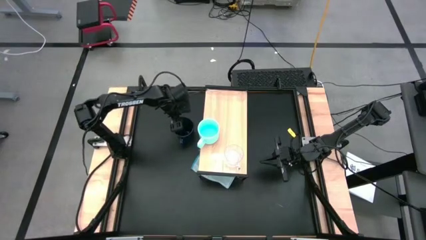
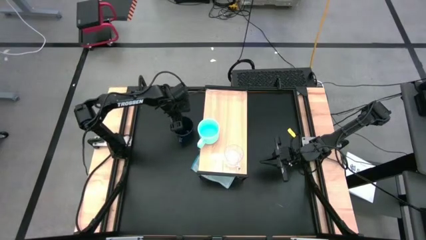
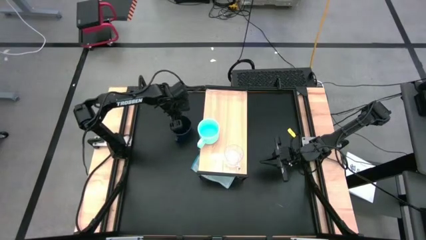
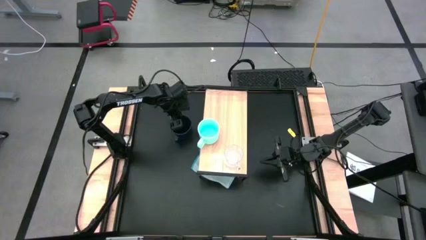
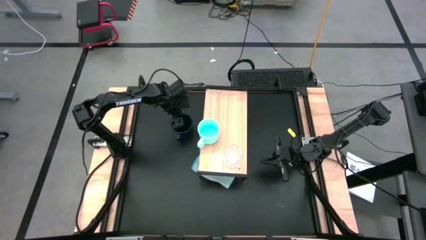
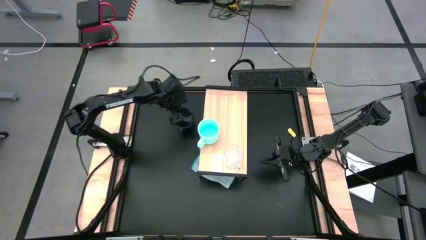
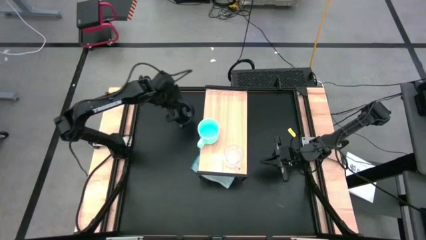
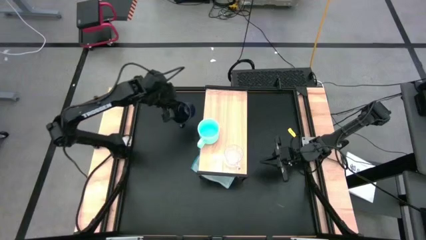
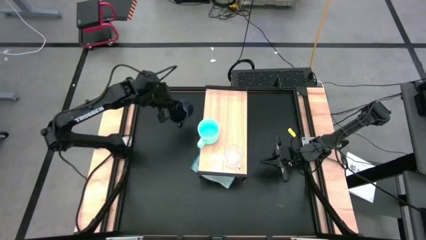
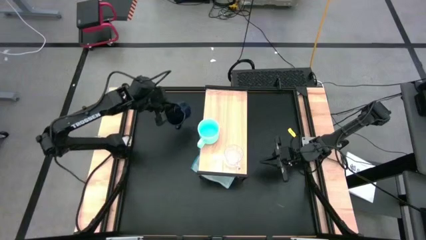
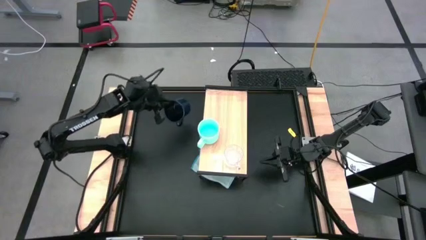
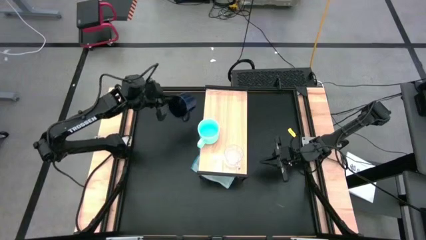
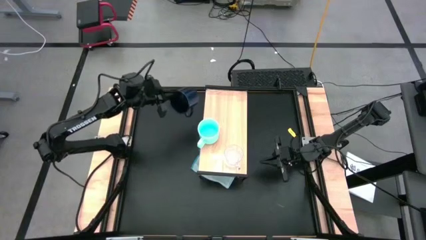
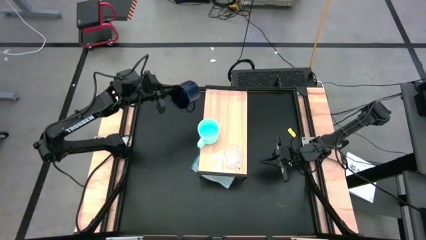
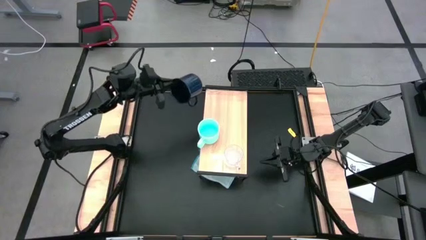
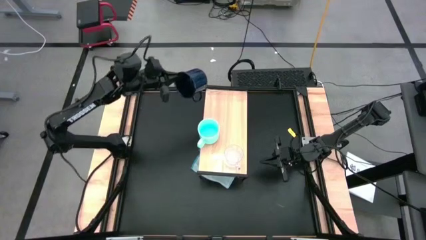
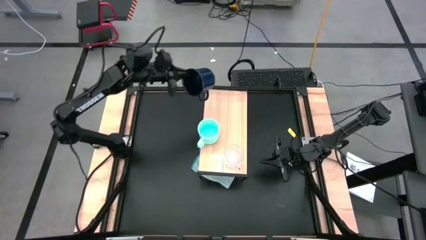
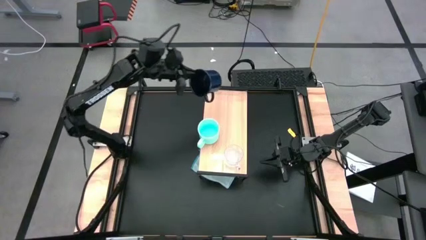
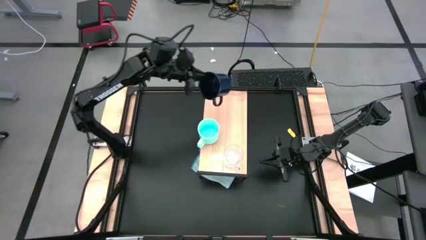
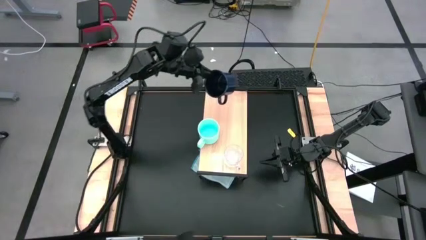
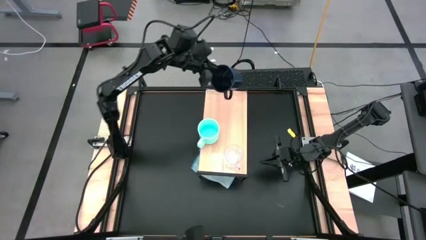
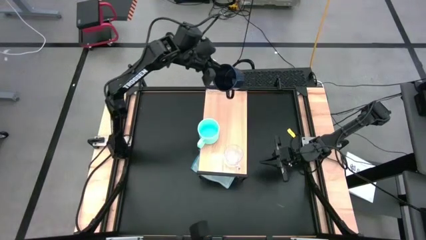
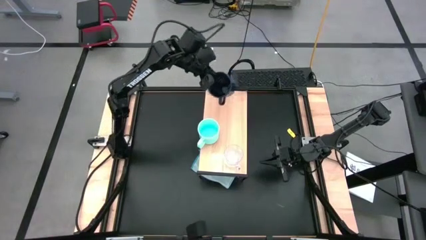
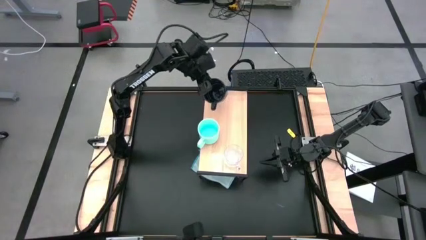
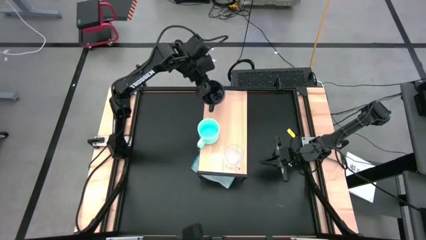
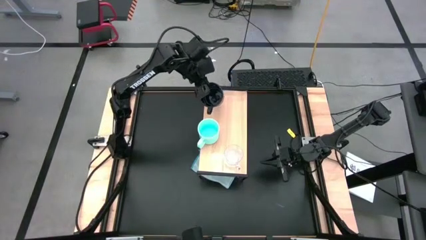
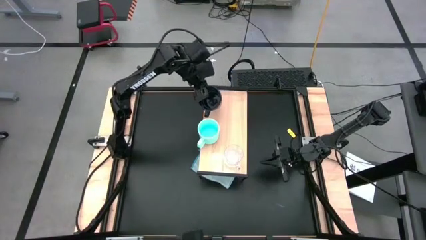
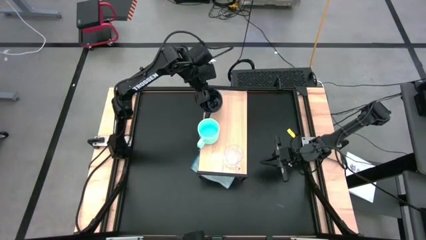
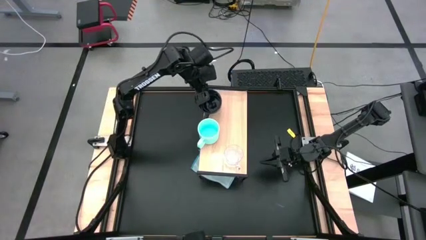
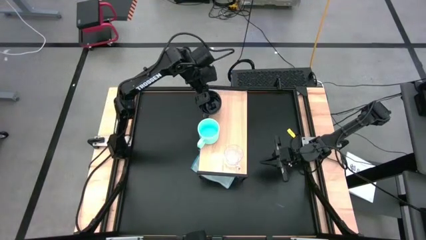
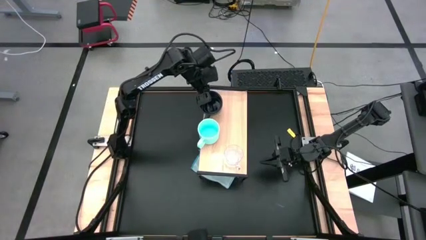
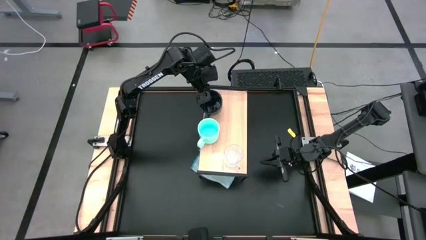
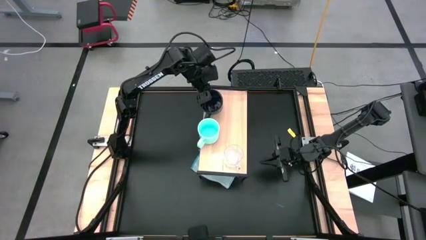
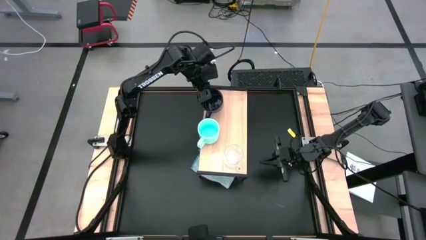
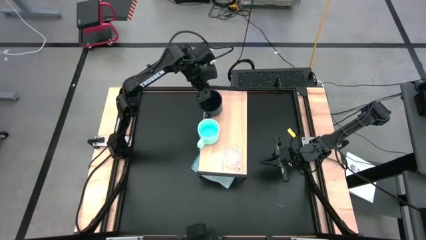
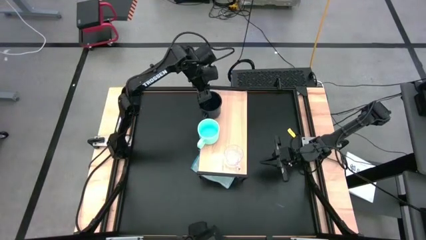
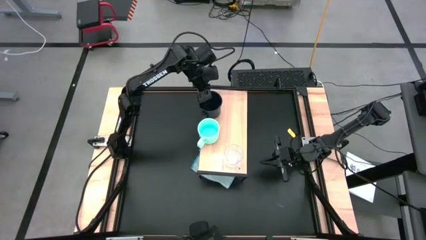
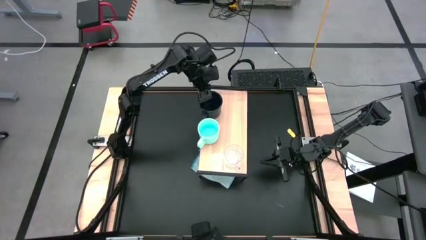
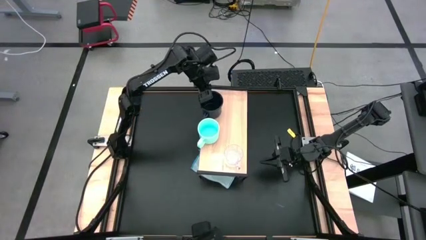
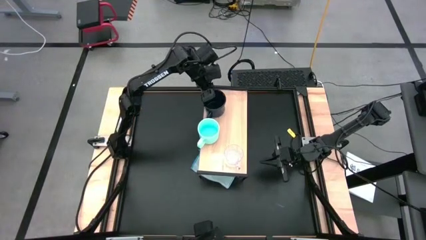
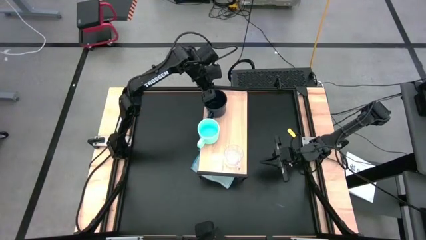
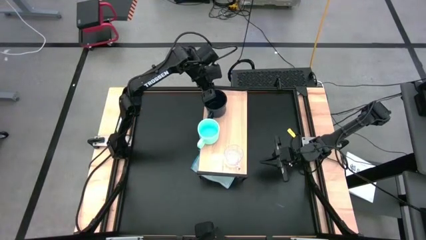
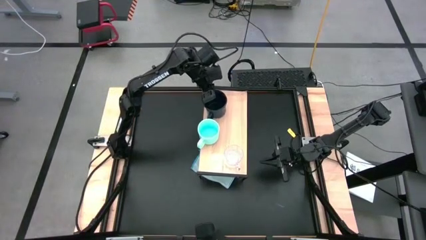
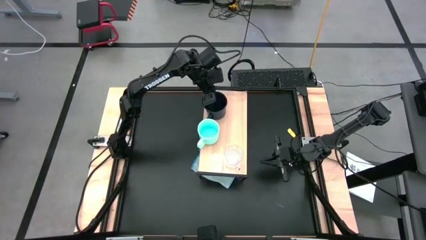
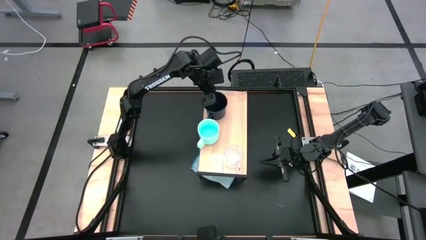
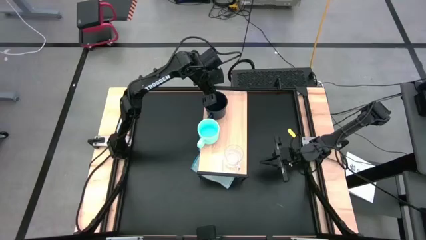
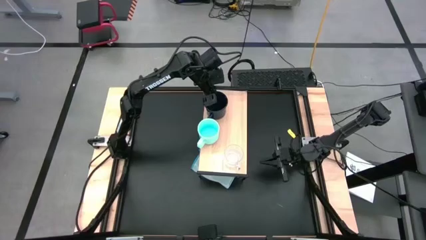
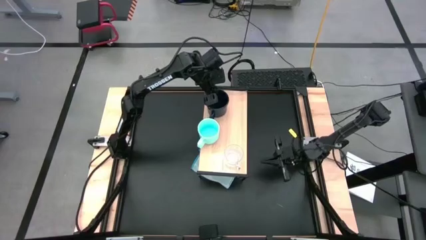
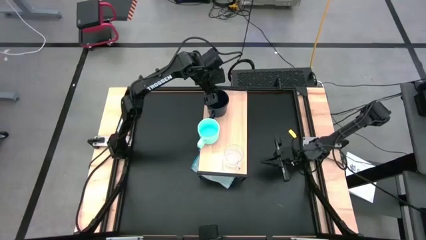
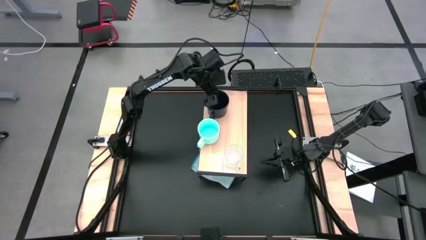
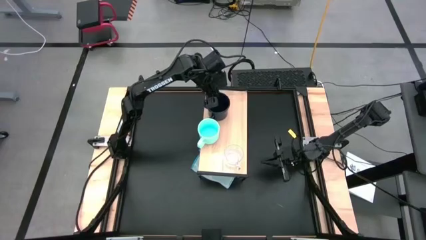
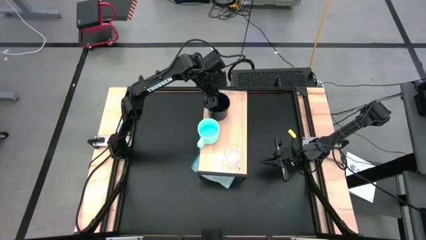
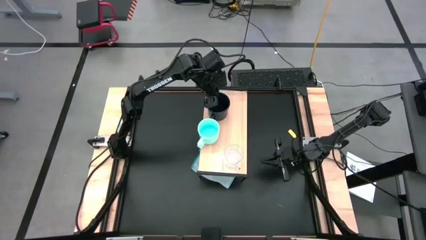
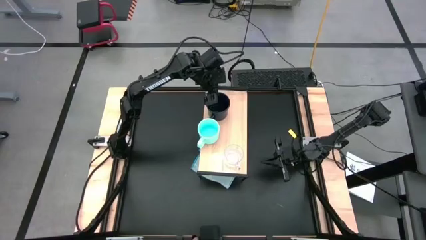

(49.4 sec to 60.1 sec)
Task: Stack small to large cups/mugs on shelf
Put the dark blue mug on the shelf
